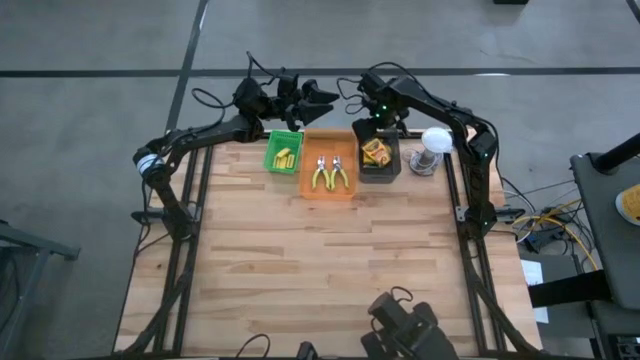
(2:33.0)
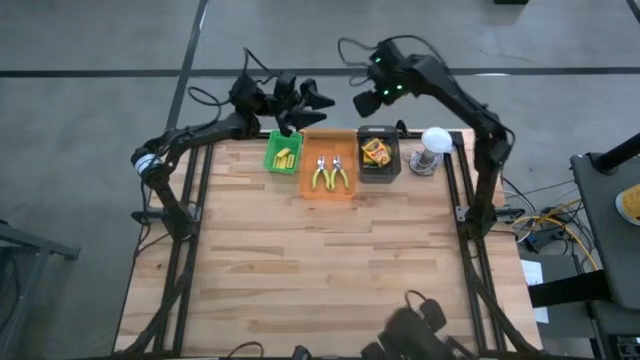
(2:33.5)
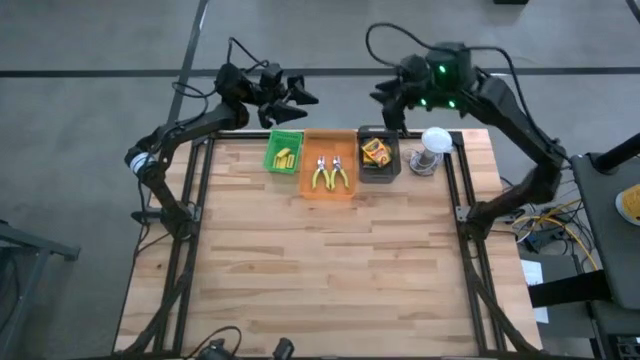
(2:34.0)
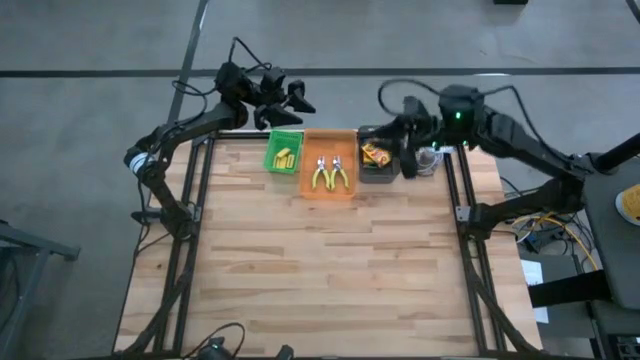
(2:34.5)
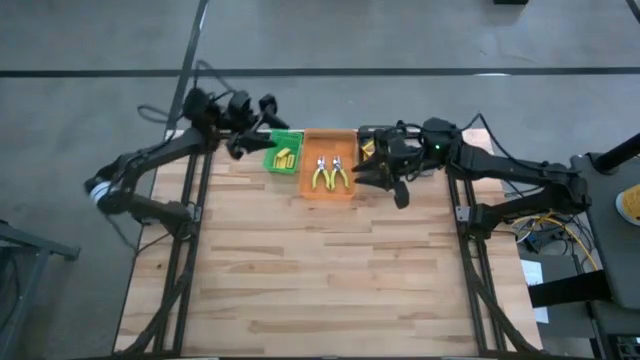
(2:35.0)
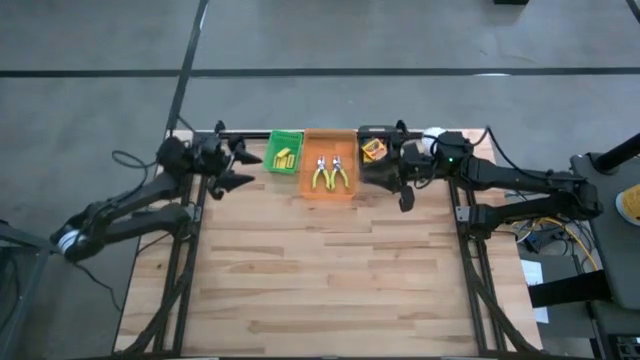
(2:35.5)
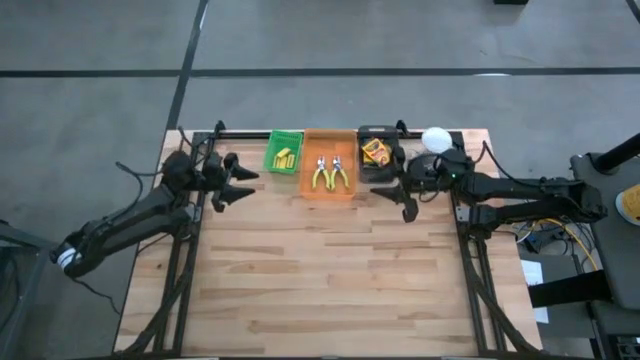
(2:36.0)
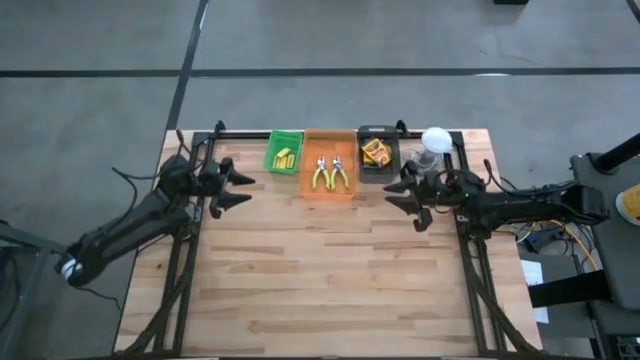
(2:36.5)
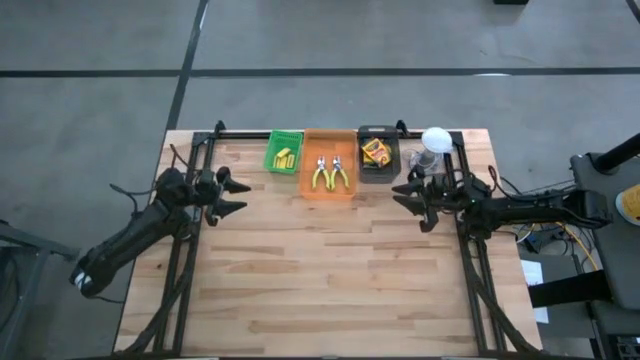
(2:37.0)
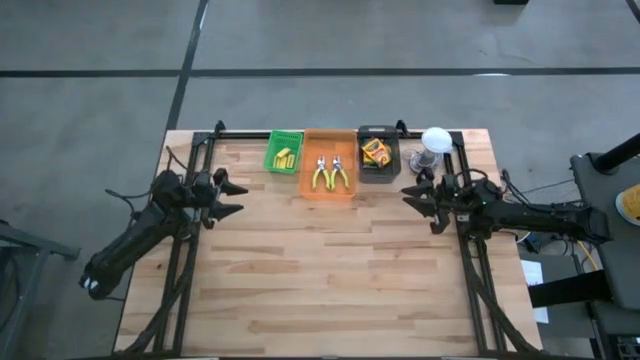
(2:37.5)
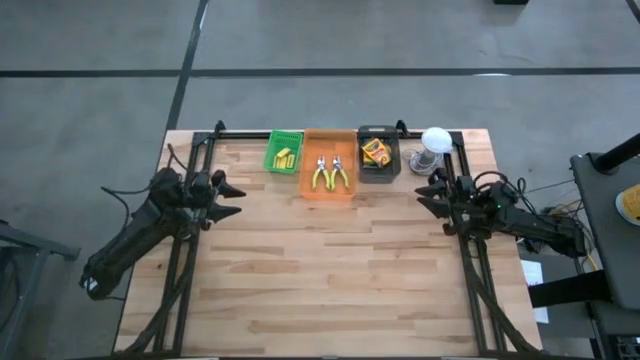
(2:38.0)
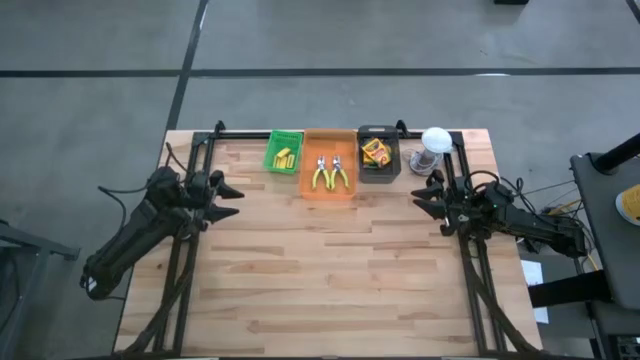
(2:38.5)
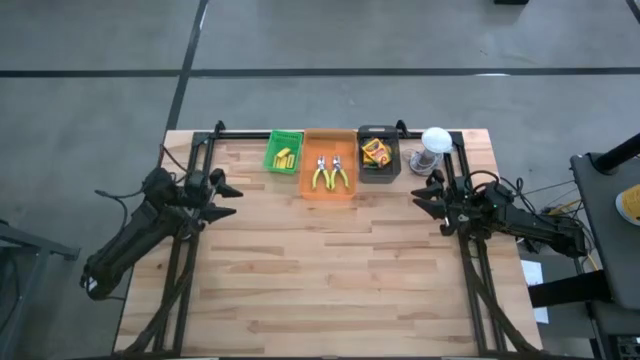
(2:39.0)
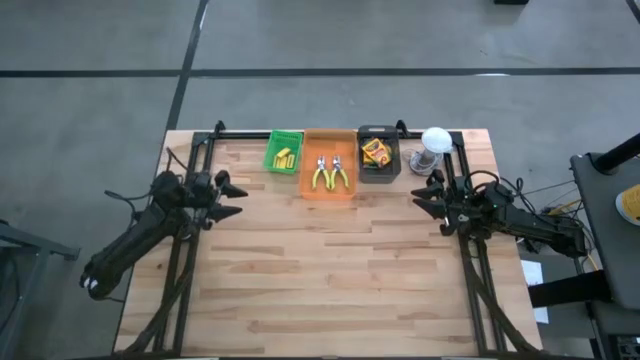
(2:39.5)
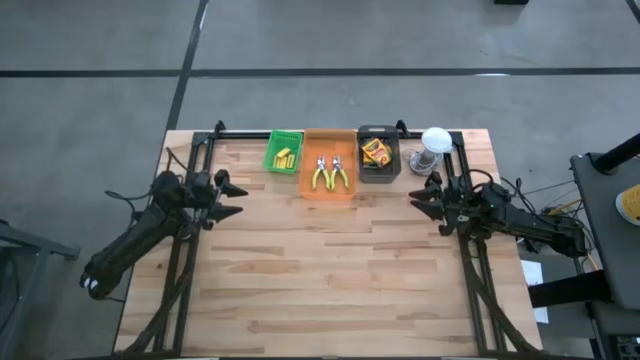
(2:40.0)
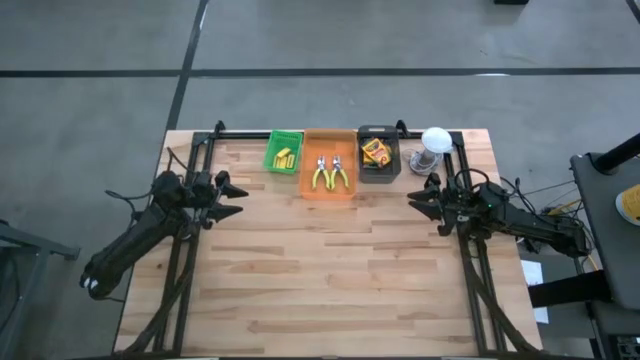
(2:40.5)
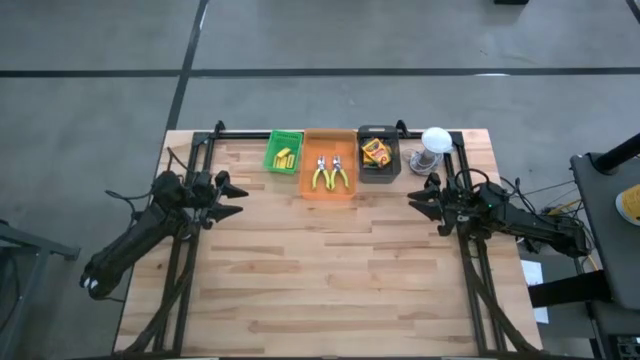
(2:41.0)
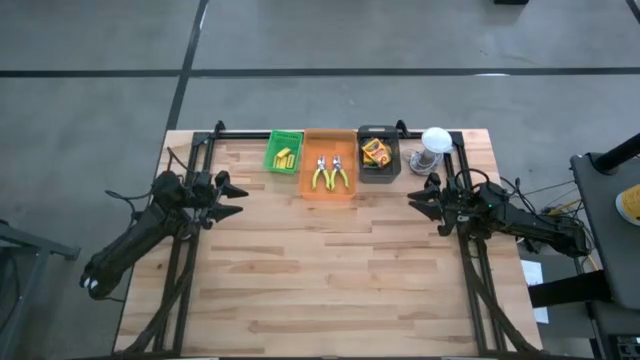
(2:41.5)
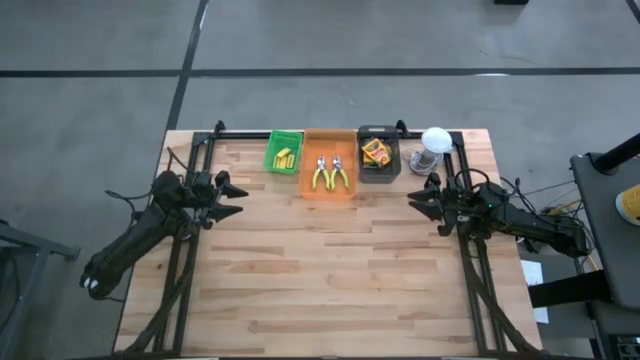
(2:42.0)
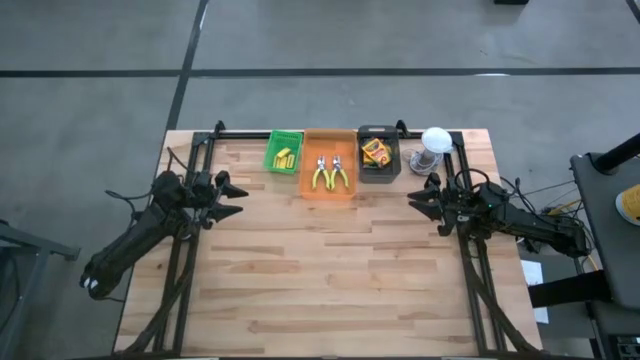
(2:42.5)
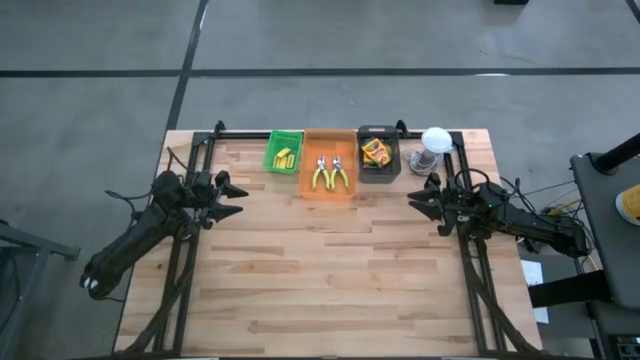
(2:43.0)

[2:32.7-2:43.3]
Task: Pick & Place School Supplies
Return to Home Position

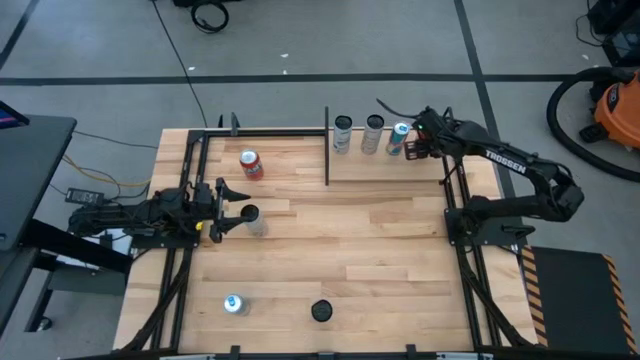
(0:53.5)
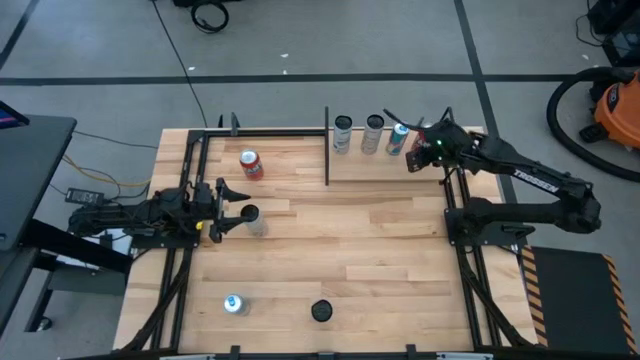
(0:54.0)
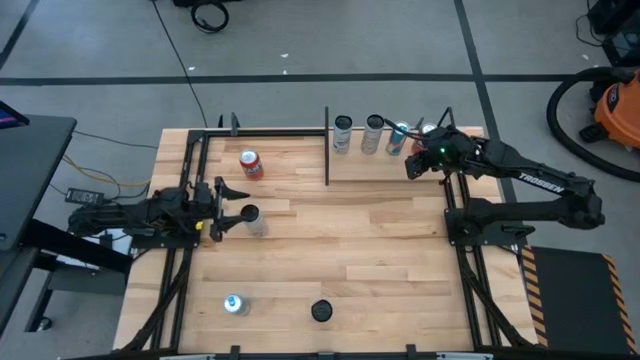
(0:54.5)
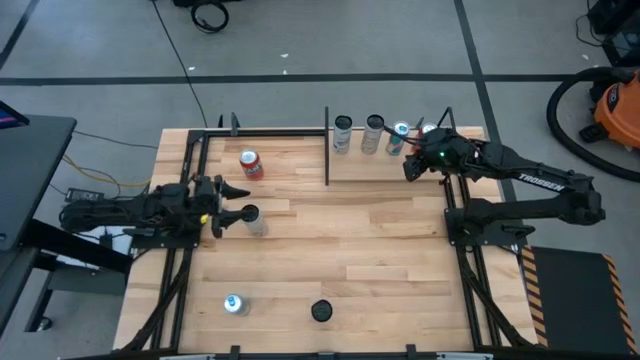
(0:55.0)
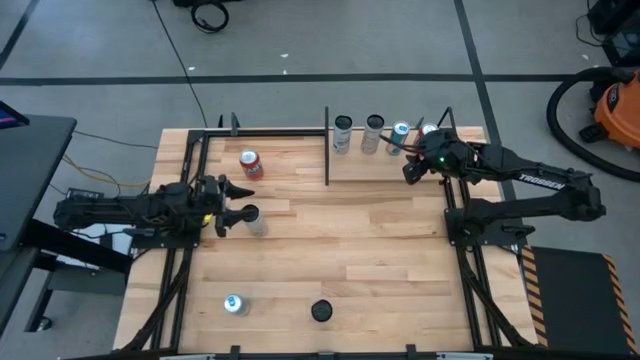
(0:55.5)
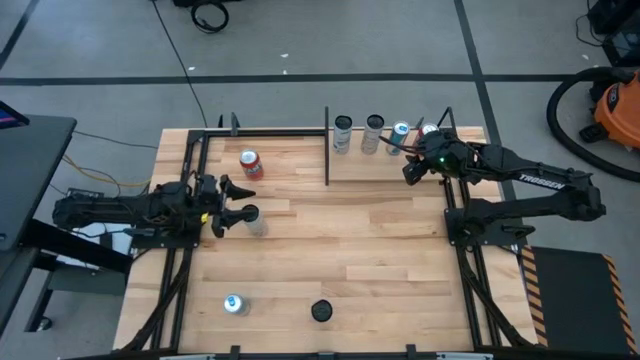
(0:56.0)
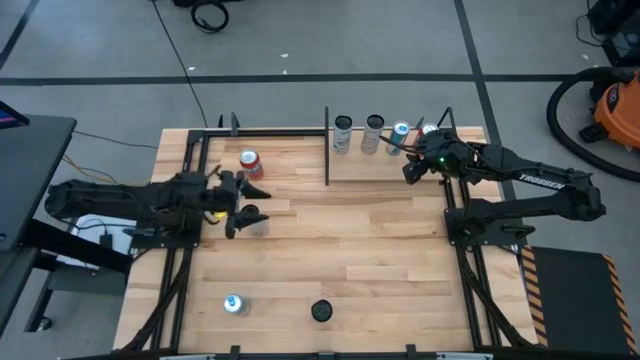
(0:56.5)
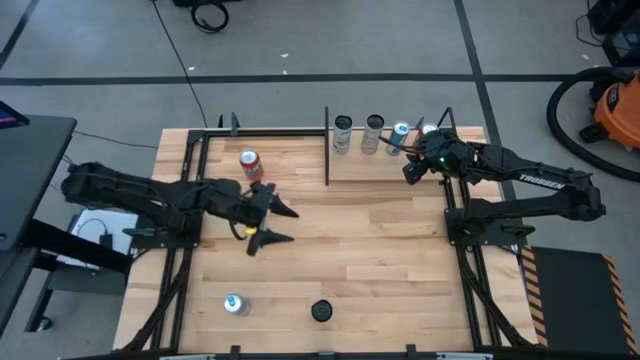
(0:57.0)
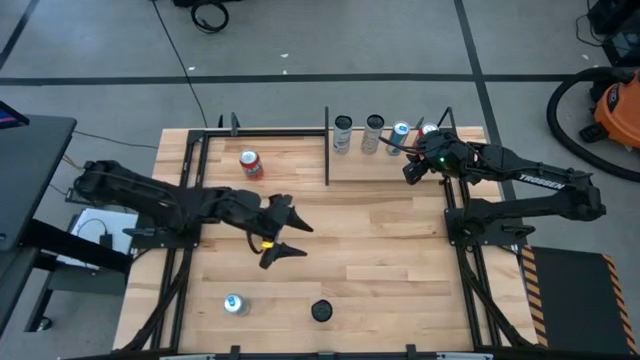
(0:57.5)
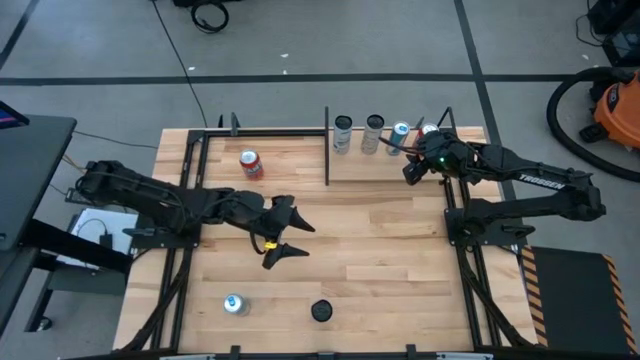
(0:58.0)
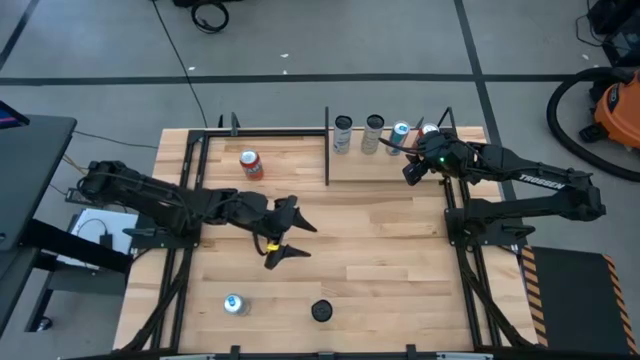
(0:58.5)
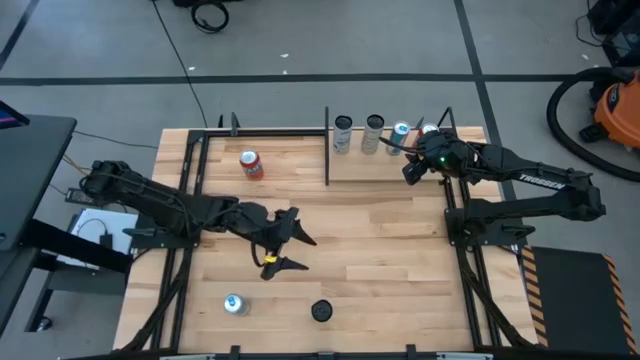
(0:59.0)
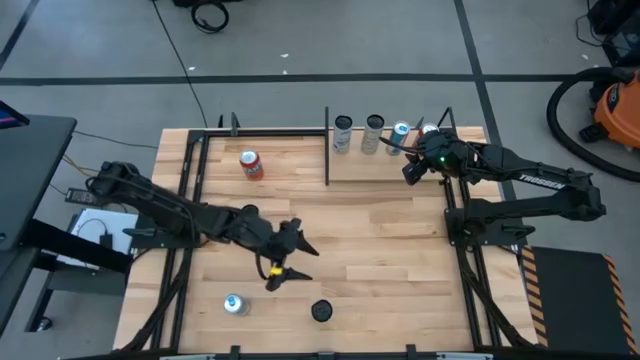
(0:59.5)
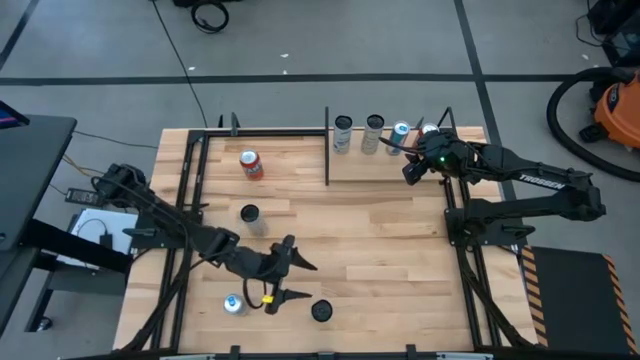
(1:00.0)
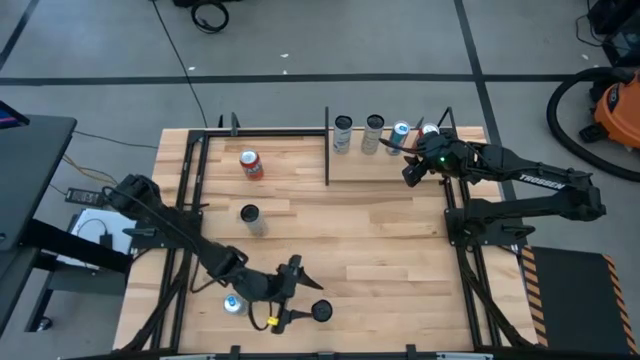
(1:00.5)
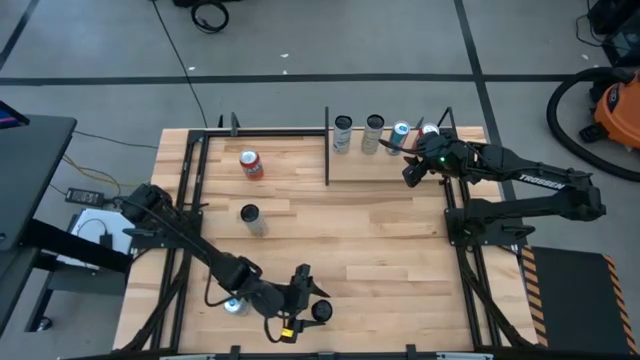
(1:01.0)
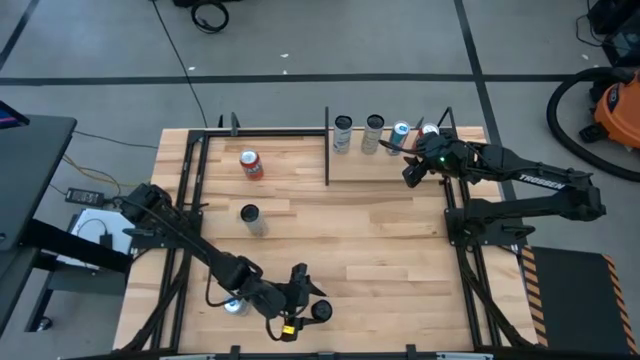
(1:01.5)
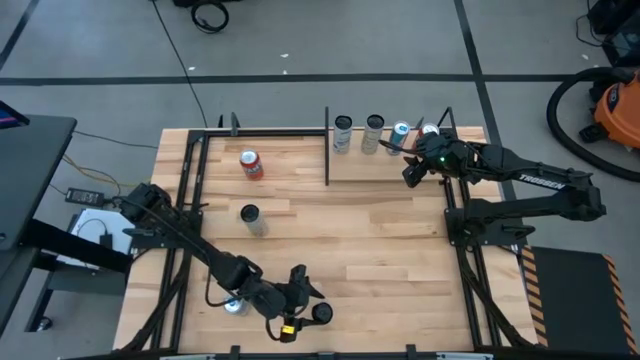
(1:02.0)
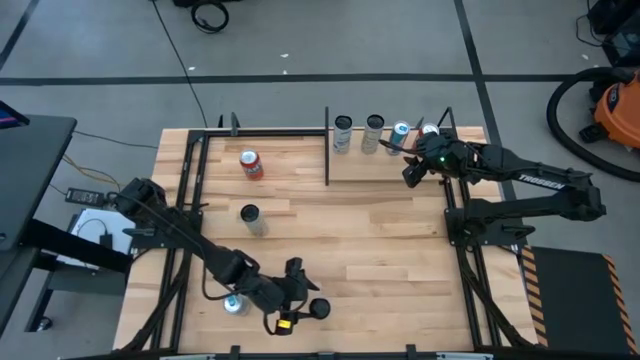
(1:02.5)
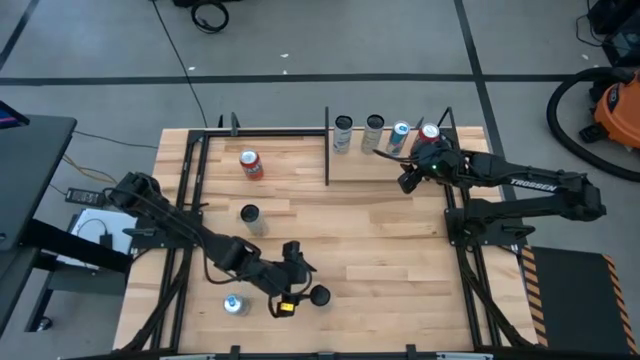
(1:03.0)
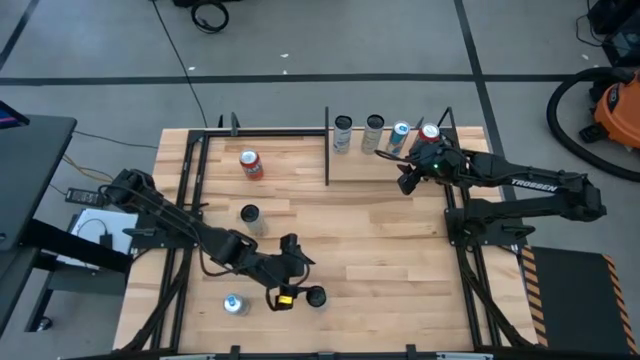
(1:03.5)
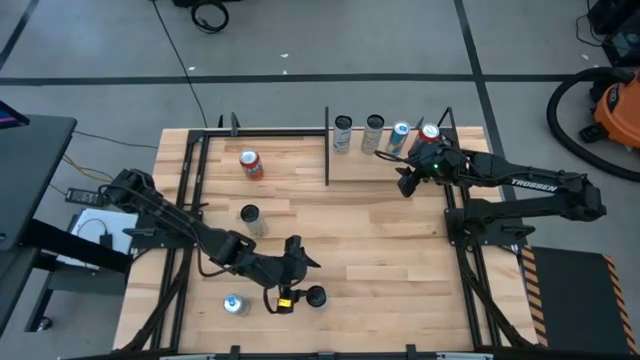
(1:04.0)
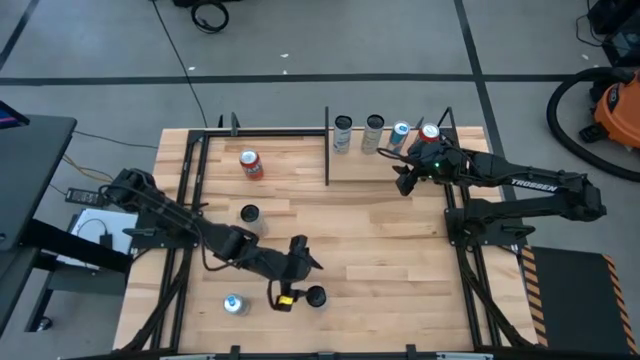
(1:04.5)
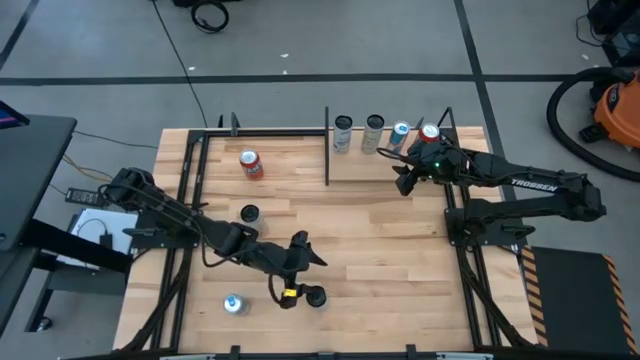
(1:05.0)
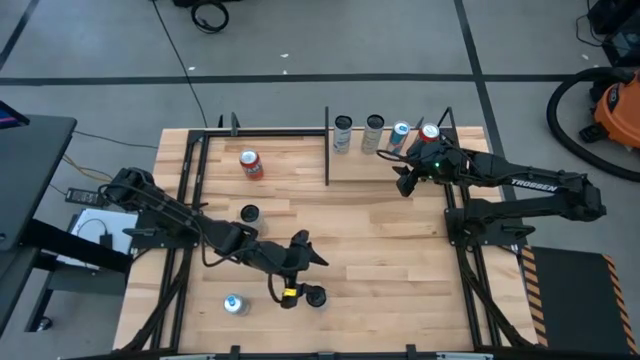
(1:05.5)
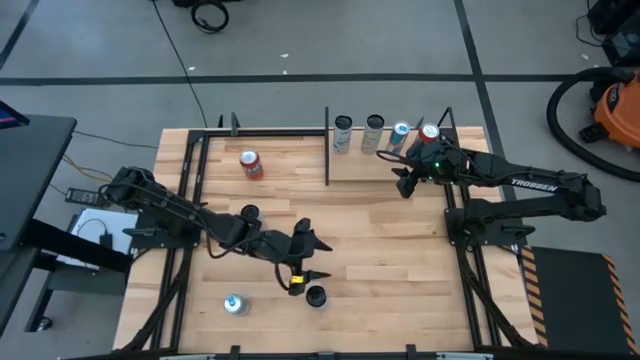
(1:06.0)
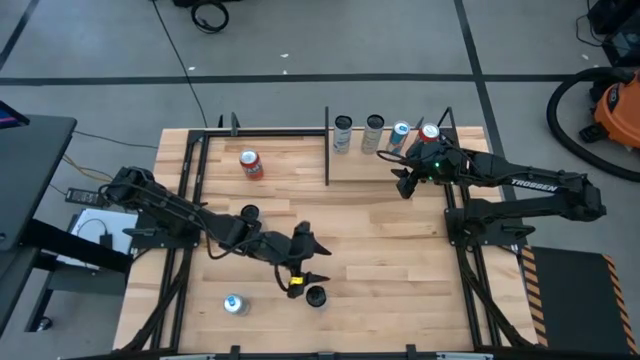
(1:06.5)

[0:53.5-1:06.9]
Task: Place canned beverage on shelf
Put the white blue soda can on the shelf aligned with the other blue white soda can
